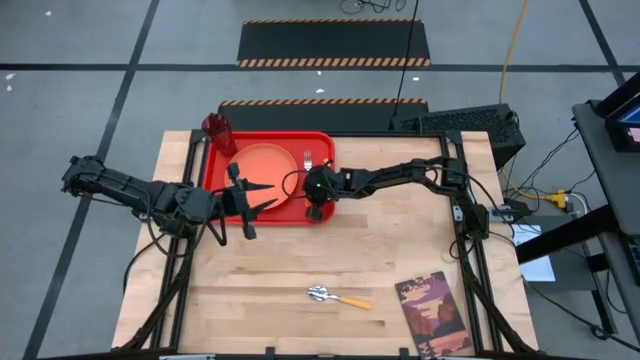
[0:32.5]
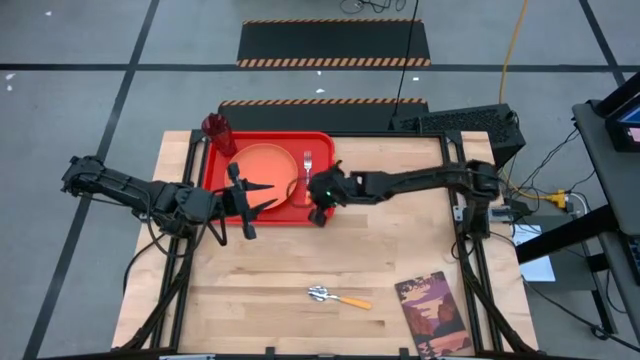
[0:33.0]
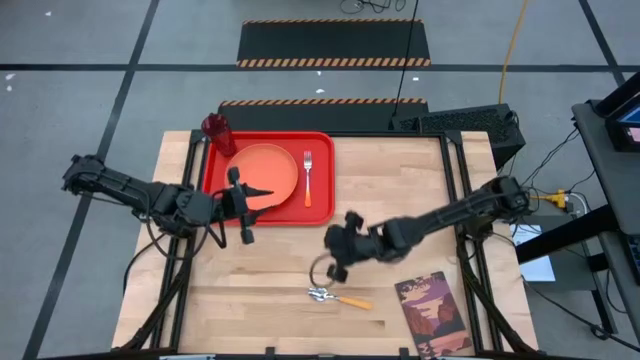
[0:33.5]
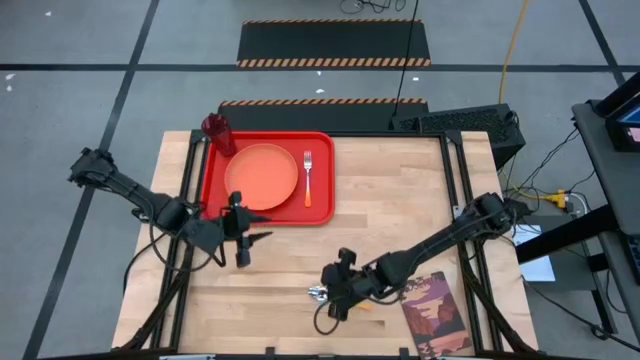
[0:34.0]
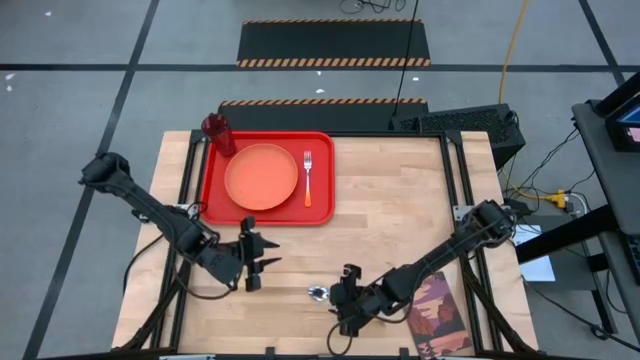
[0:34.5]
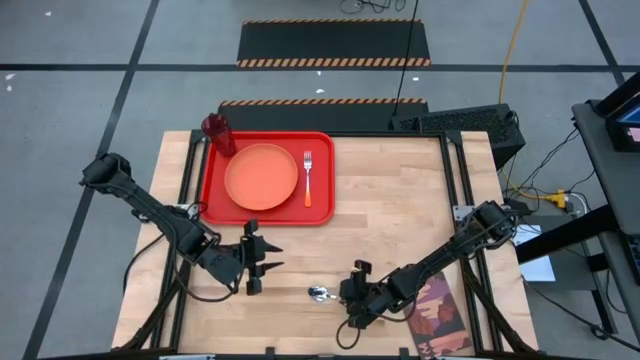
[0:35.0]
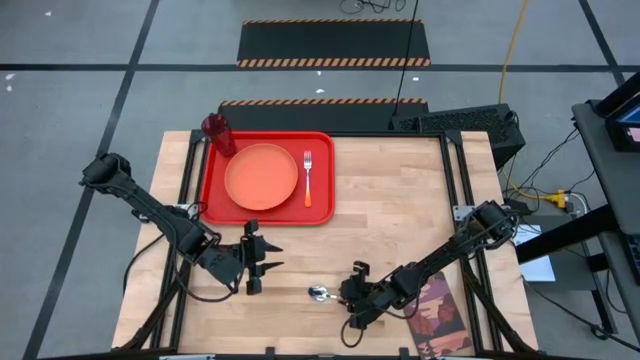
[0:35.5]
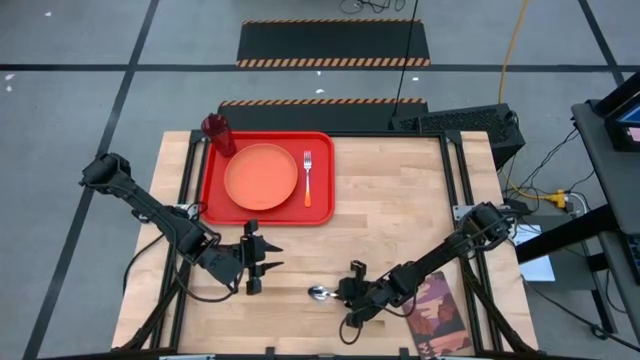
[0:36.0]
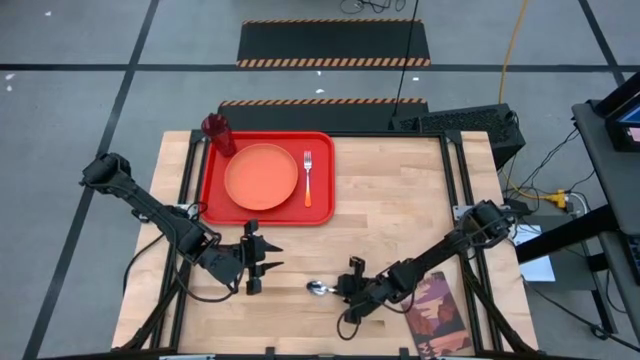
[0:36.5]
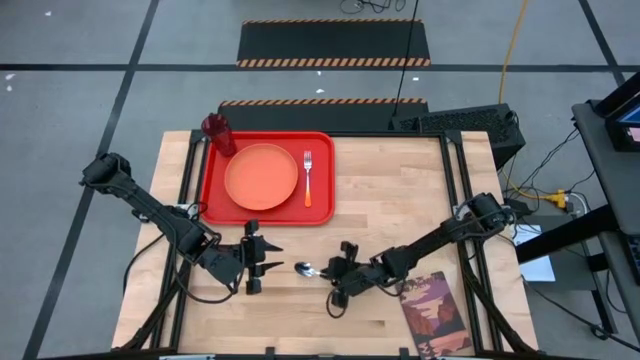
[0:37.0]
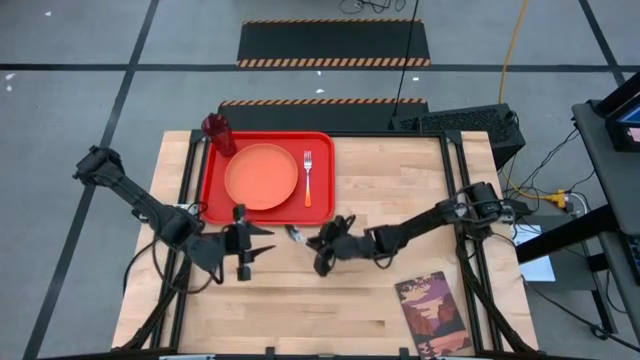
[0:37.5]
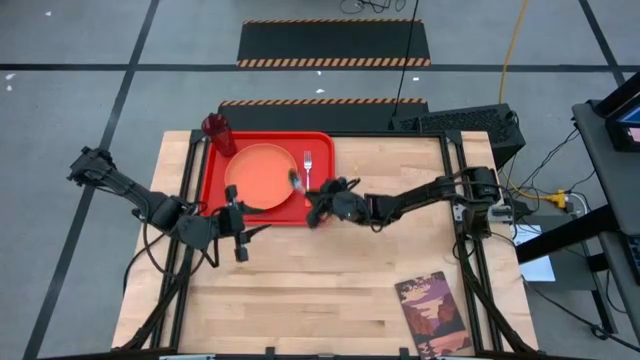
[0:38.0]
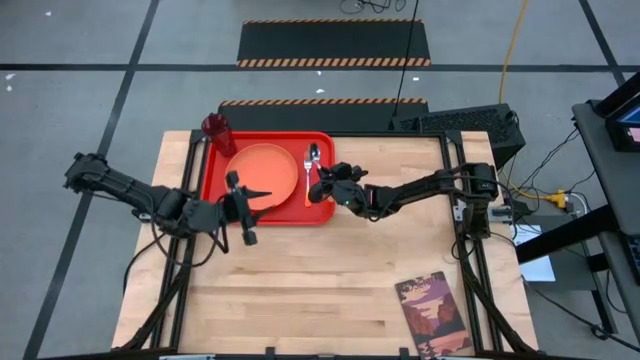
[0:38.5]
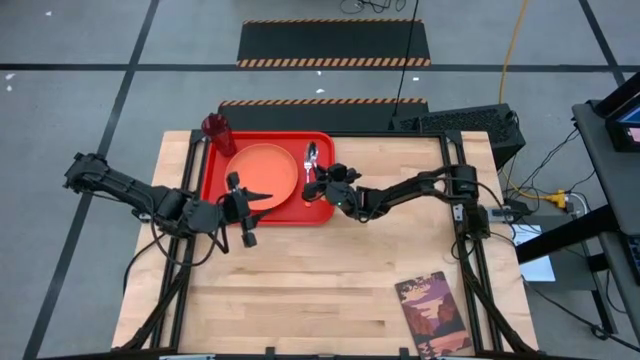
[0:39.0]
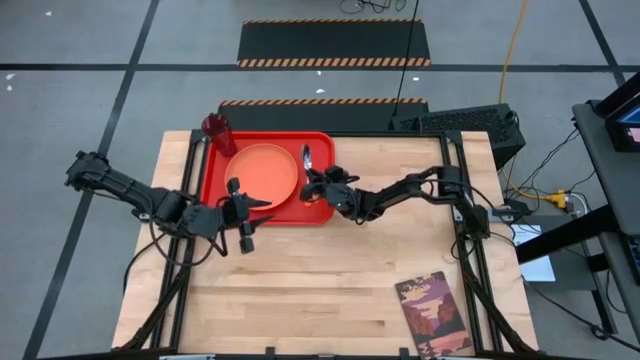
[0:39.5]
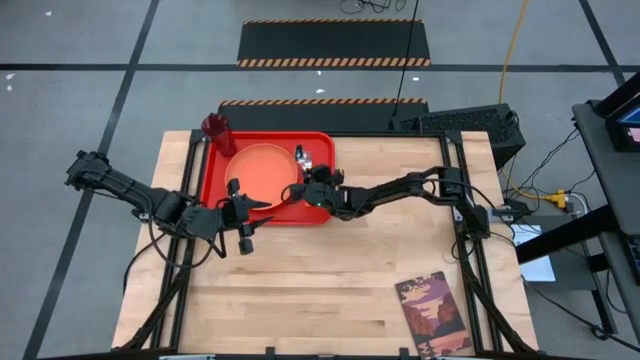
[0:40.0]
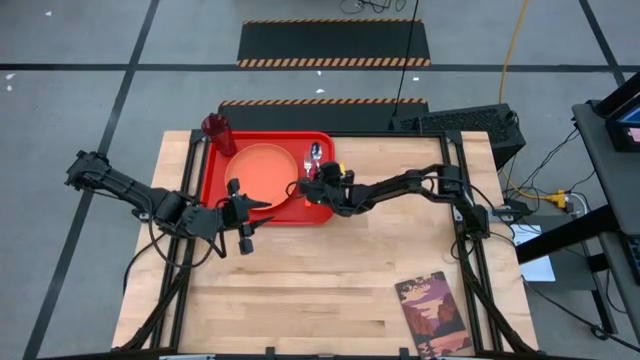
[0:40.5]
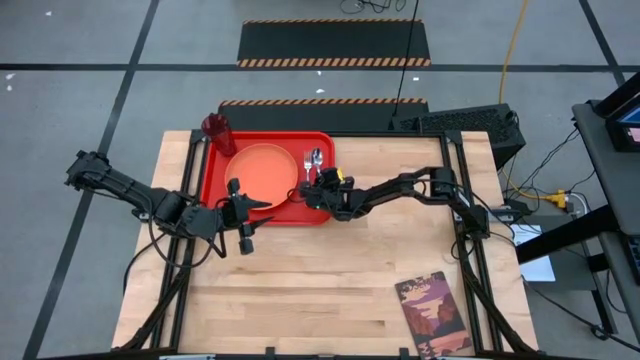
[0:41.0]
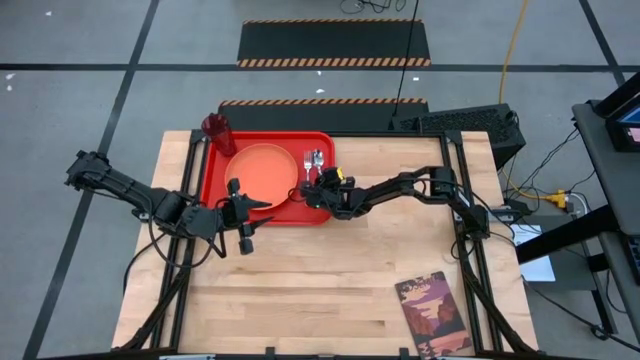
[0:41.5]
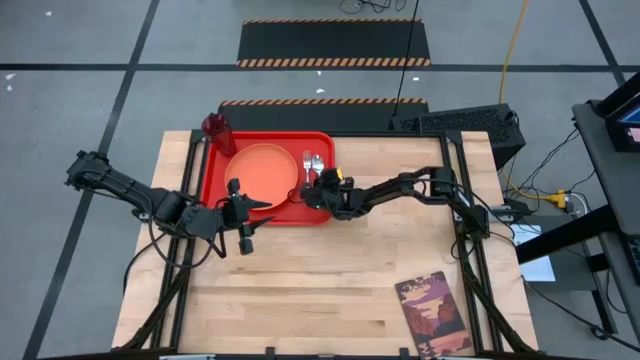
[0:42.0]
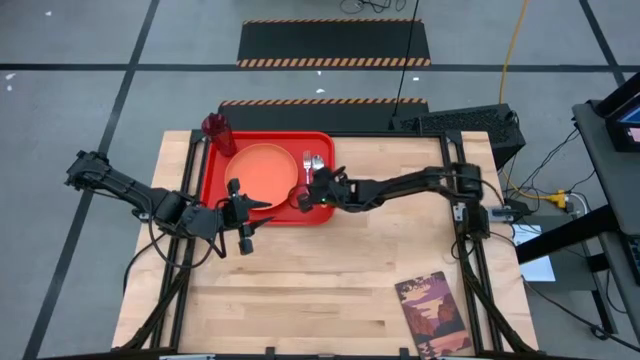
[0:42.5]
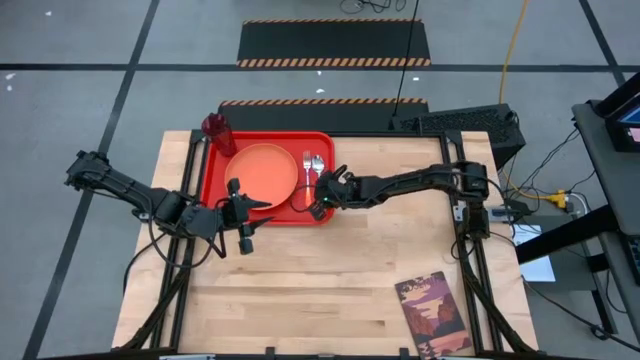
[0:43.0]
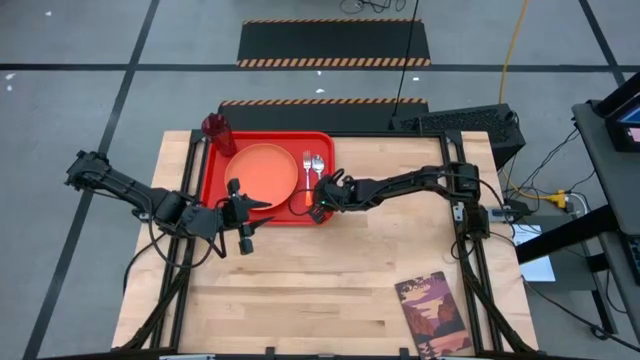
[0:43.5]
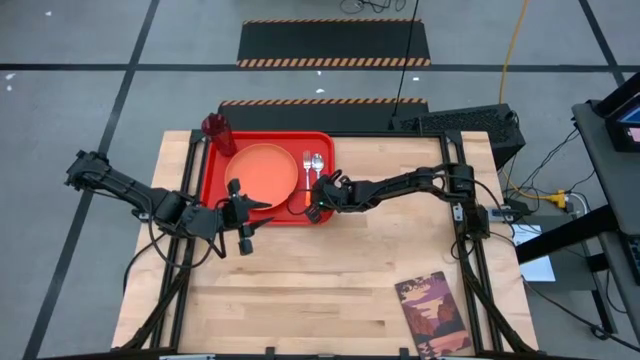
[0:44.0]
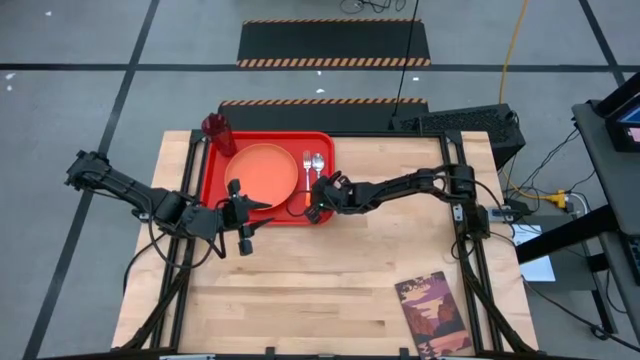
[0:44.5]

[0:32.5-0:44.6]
Task: Pick and place plate/cup/fork/spoon on tray
Put the yellow spoon on the orange tray to the right of the orange fork

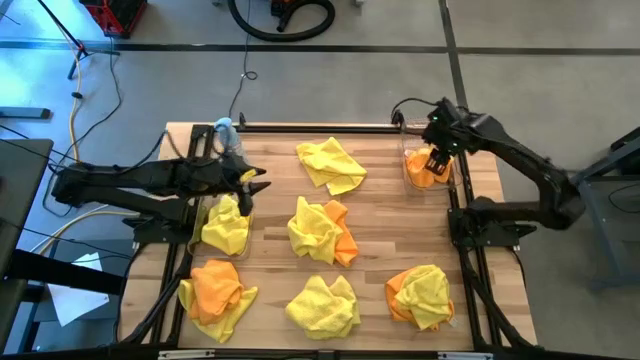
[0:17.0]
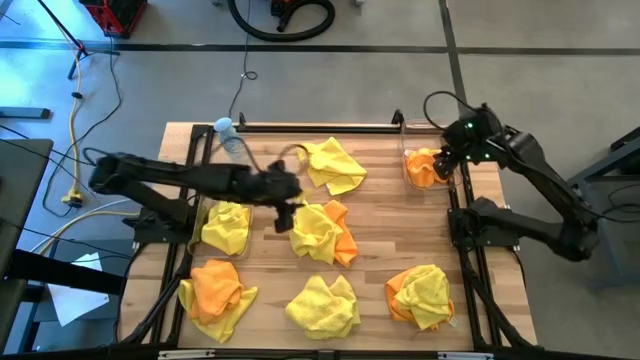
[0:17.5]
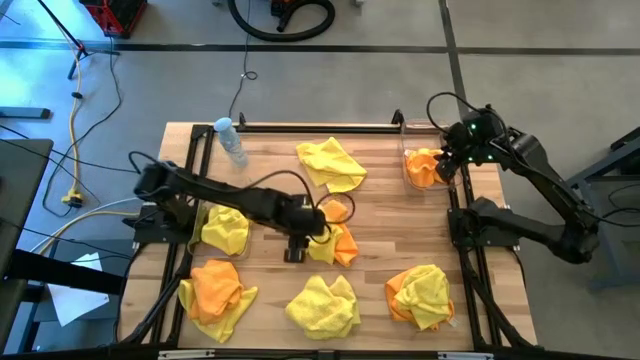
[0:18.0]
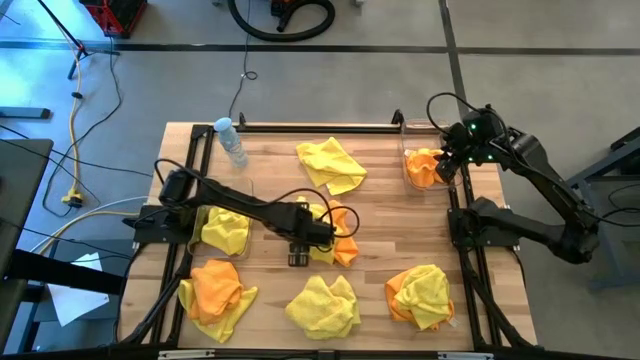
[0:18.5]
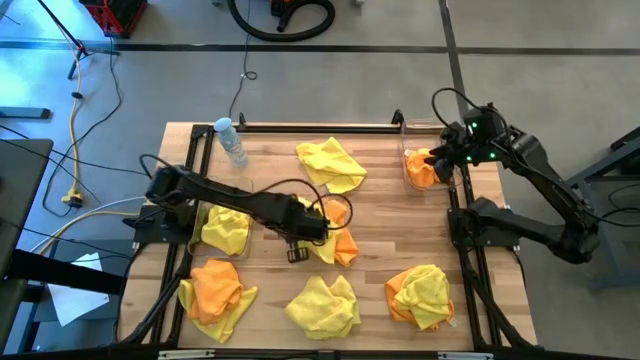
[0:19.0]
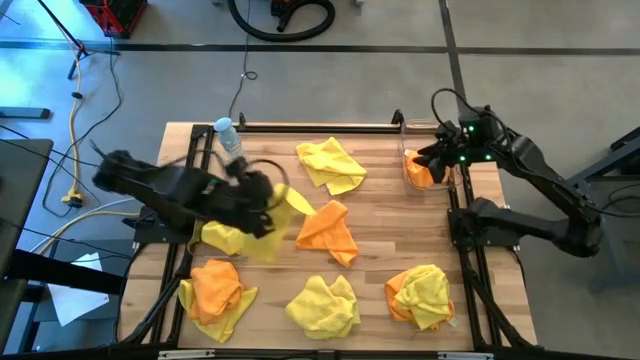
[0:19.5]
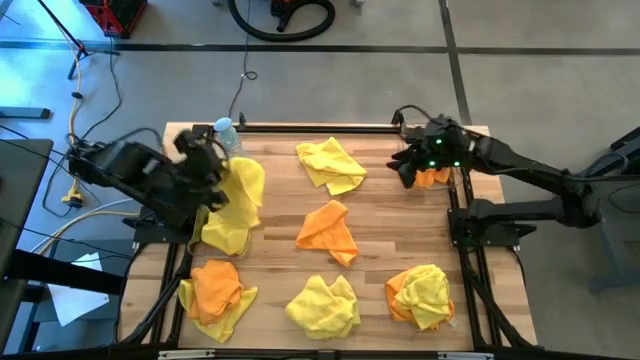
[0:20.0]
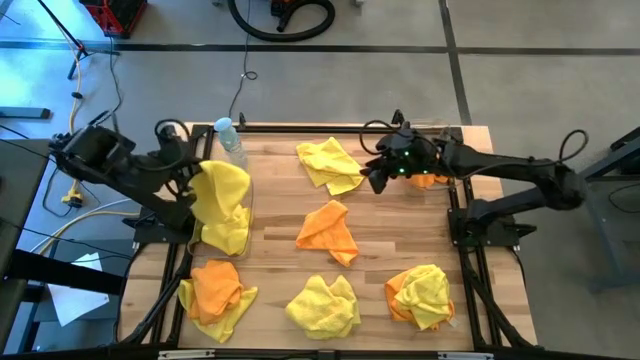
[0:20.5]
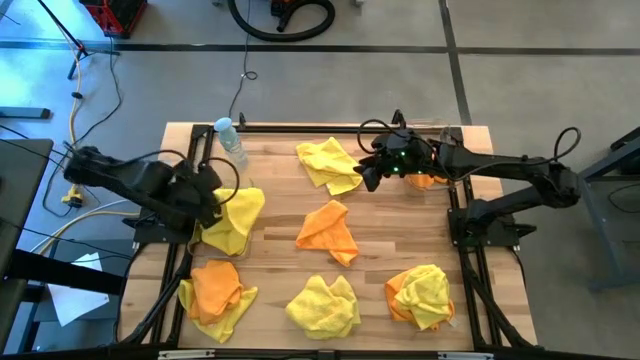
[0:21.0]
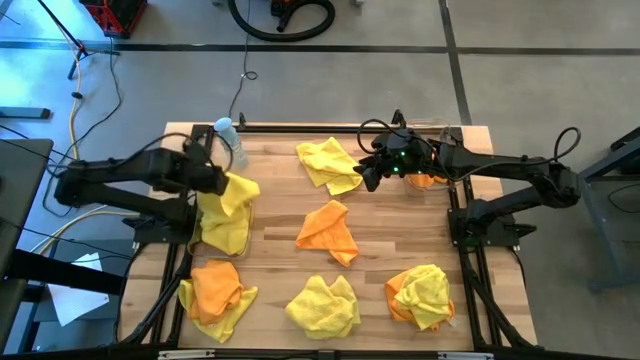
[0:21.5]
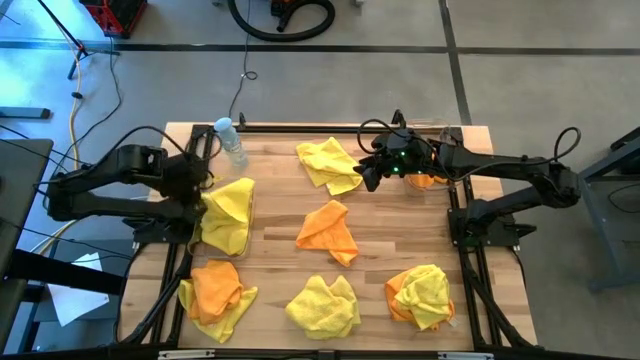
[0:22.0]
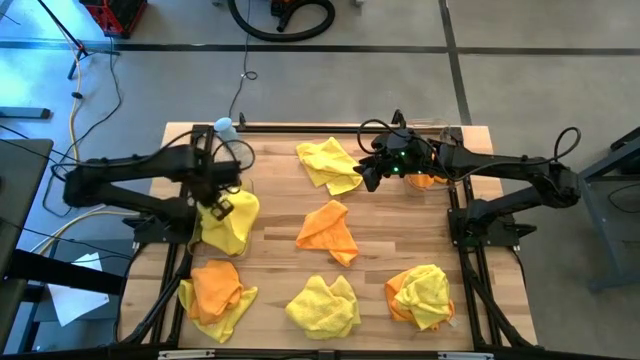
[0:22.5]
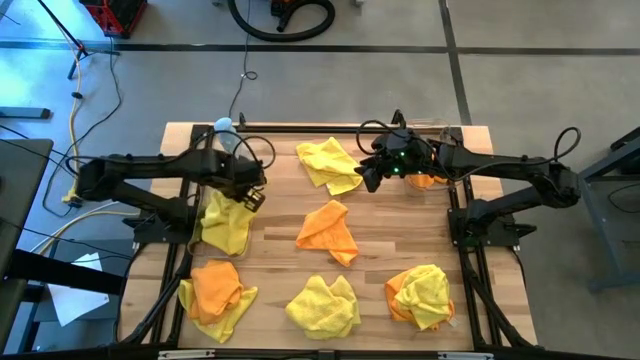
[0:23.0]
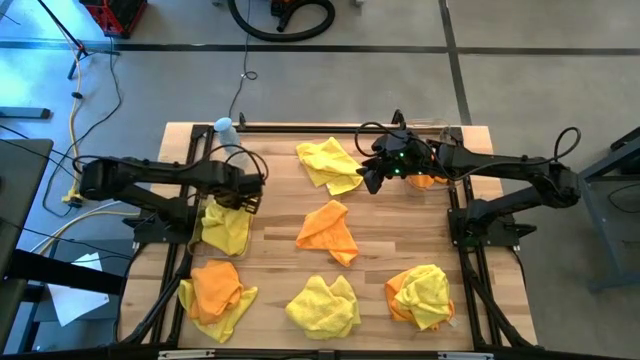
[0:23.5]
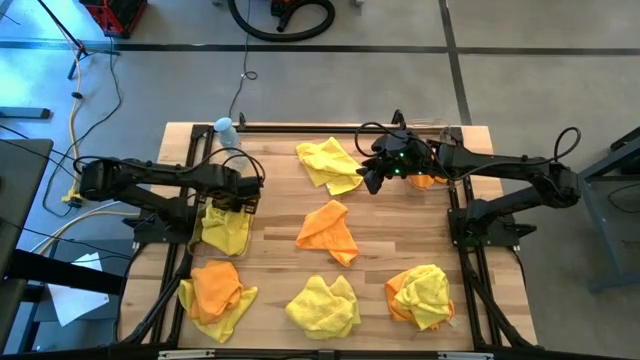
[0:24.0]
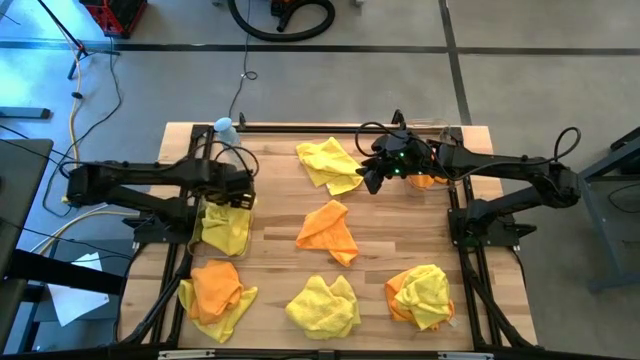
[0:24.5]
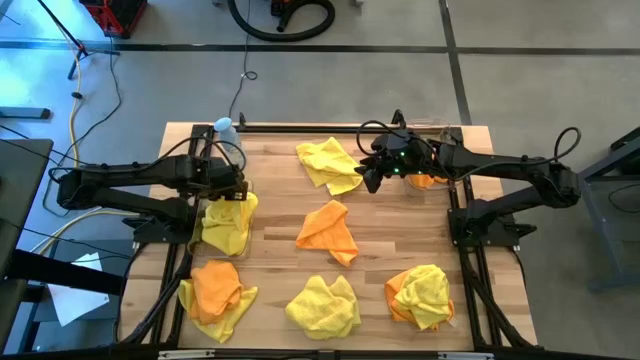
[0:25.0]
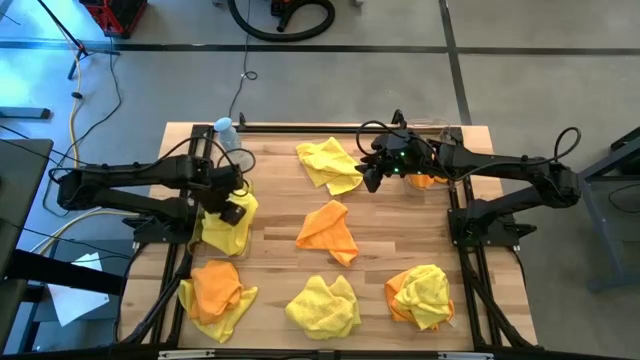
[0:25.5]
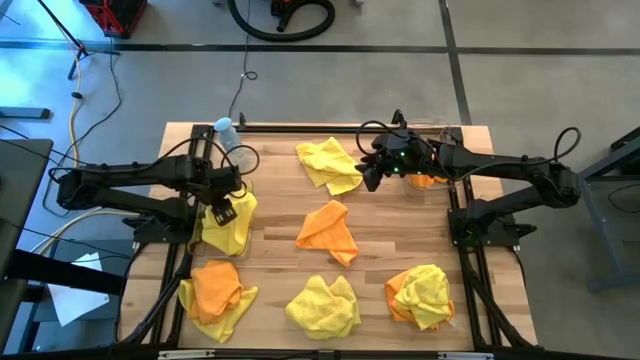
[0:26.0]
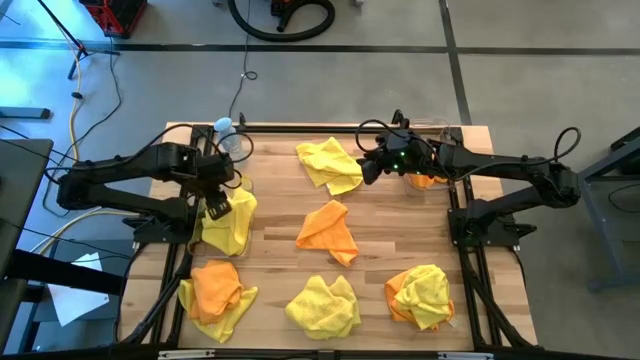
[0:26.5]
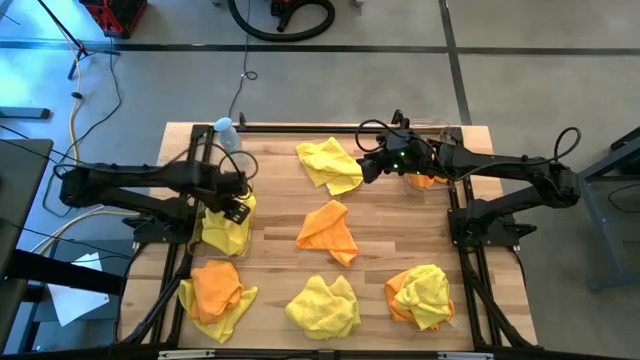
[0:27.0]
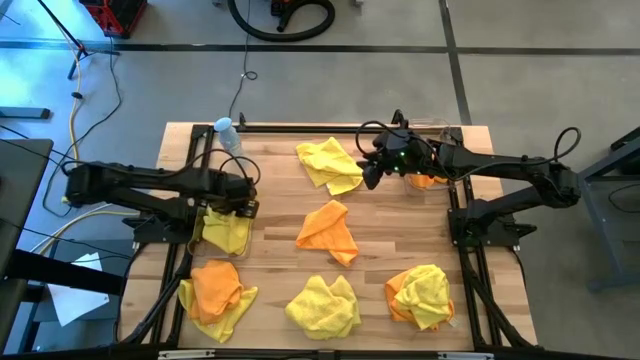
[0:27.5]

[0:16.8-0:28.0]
Task: Sort microfiber towel by color & place in baskets
Put the yellow microfiber cloth into the left transparent bin
